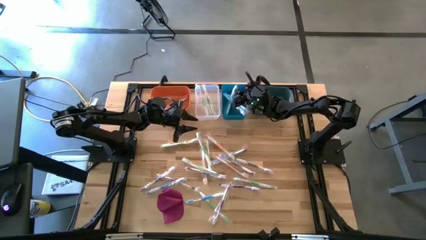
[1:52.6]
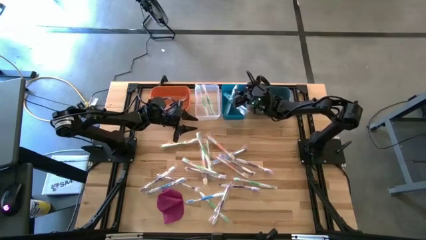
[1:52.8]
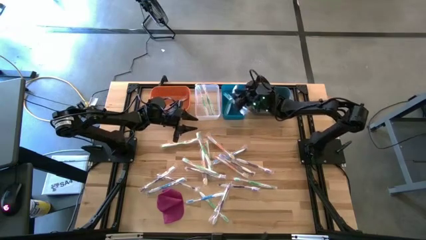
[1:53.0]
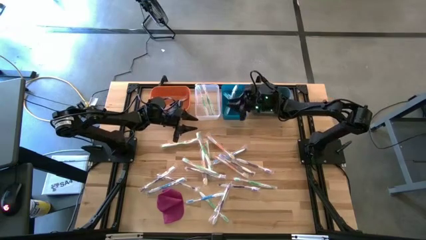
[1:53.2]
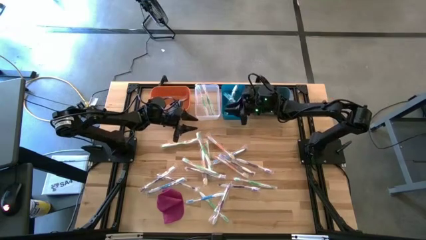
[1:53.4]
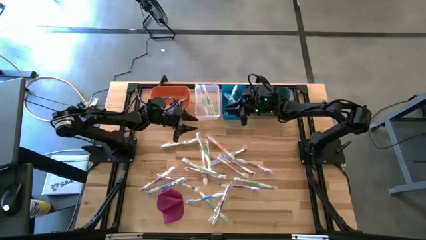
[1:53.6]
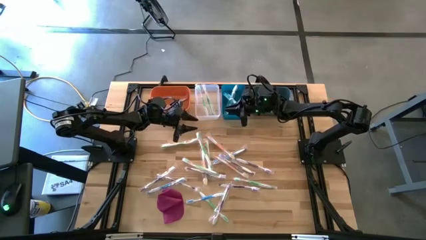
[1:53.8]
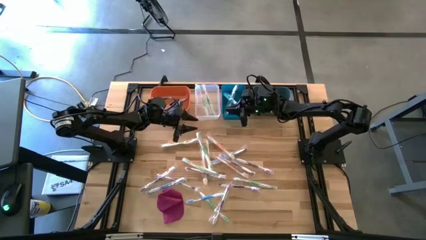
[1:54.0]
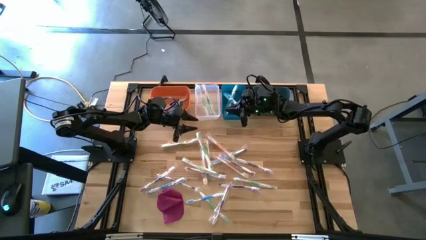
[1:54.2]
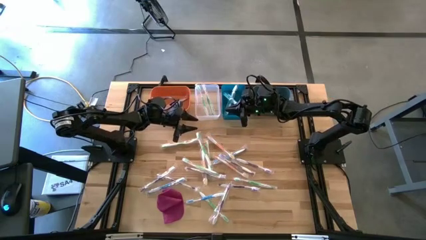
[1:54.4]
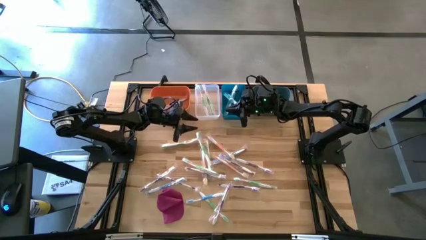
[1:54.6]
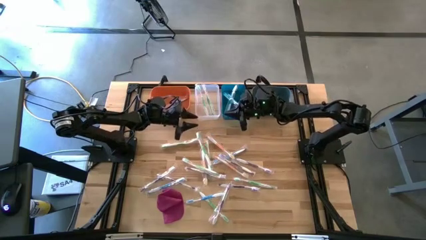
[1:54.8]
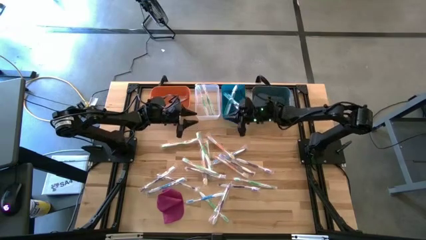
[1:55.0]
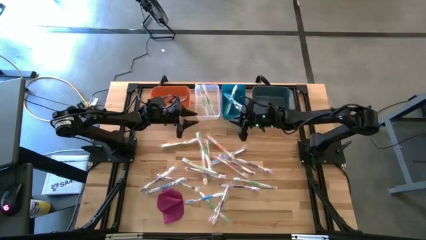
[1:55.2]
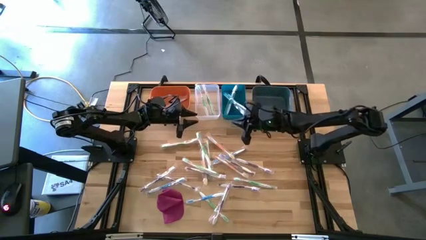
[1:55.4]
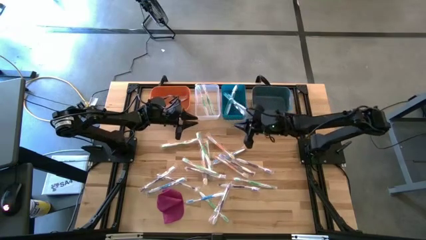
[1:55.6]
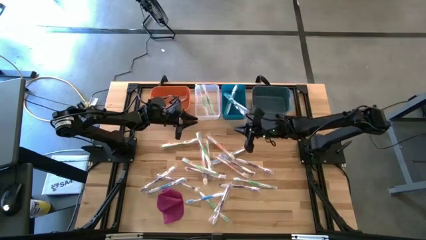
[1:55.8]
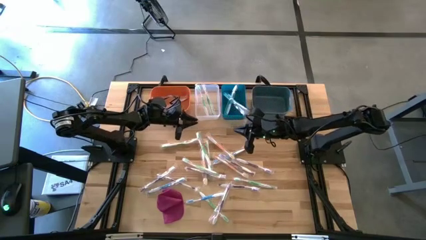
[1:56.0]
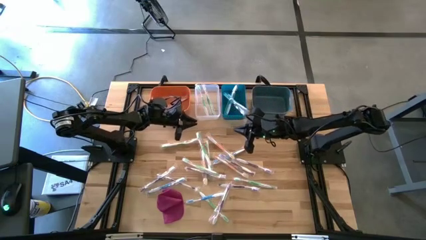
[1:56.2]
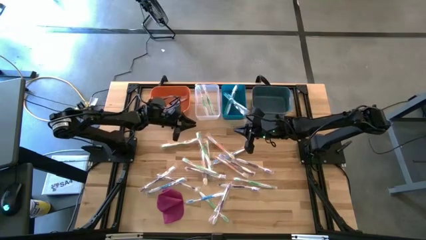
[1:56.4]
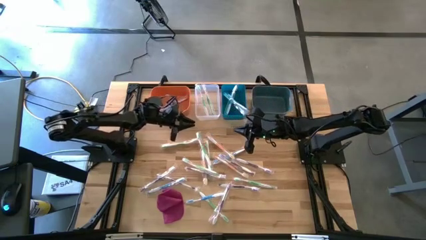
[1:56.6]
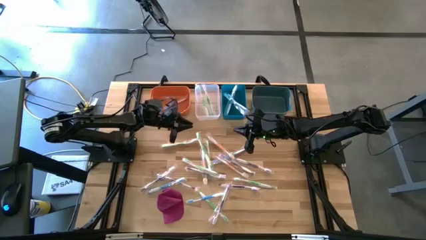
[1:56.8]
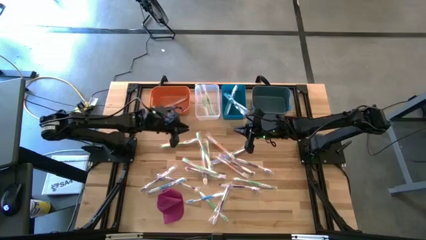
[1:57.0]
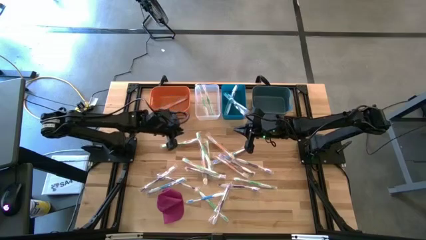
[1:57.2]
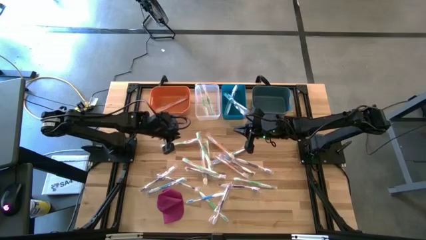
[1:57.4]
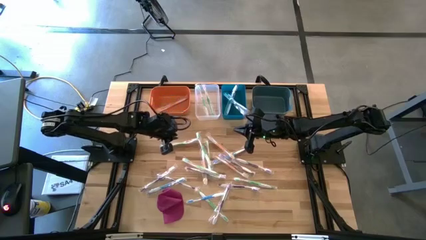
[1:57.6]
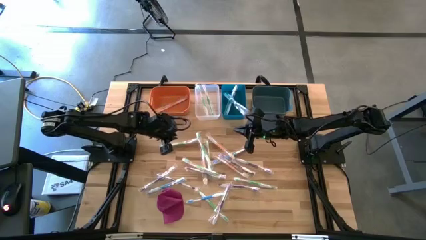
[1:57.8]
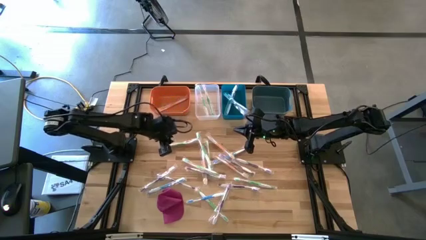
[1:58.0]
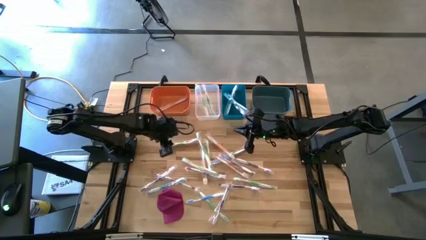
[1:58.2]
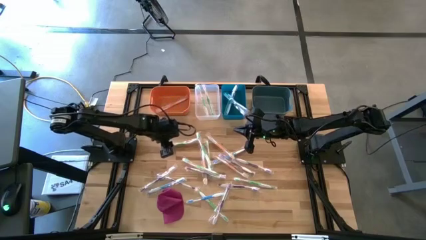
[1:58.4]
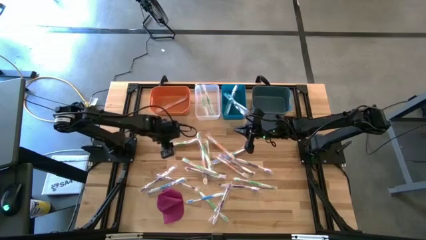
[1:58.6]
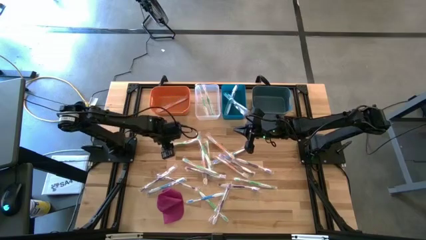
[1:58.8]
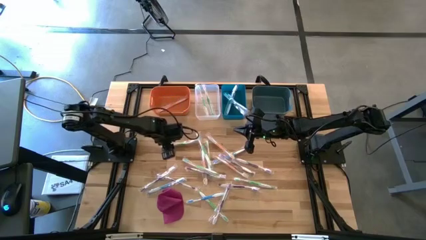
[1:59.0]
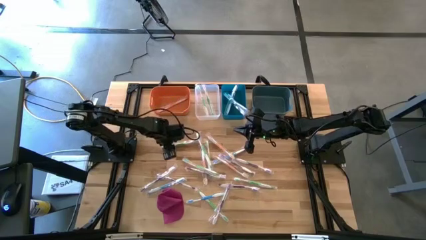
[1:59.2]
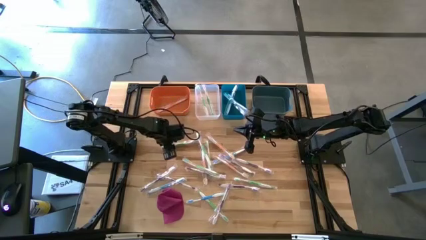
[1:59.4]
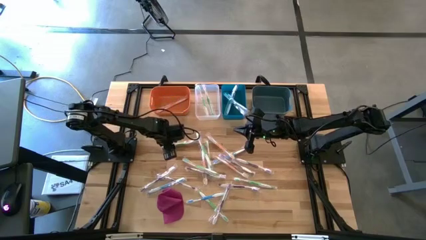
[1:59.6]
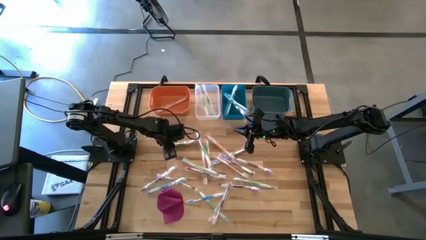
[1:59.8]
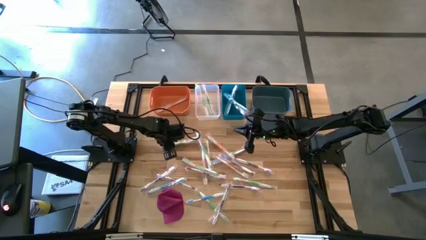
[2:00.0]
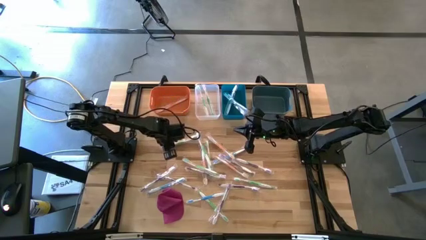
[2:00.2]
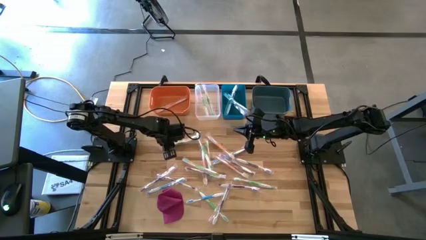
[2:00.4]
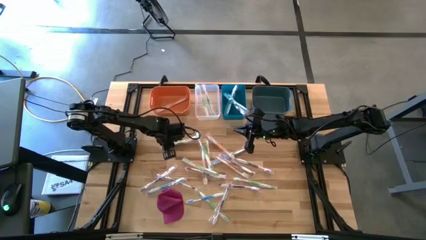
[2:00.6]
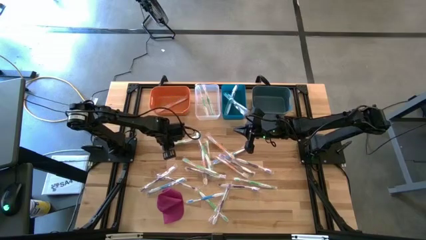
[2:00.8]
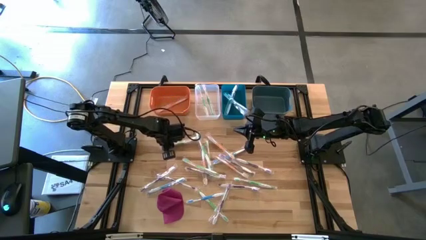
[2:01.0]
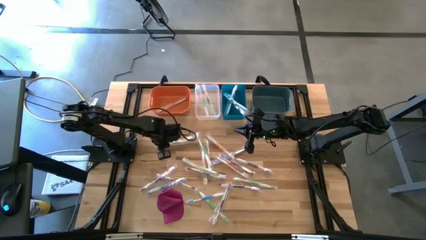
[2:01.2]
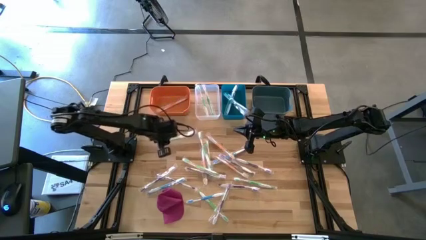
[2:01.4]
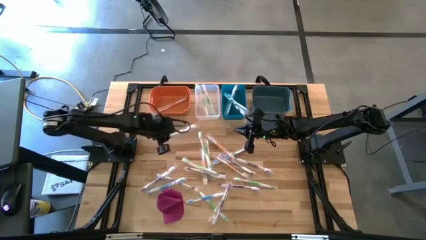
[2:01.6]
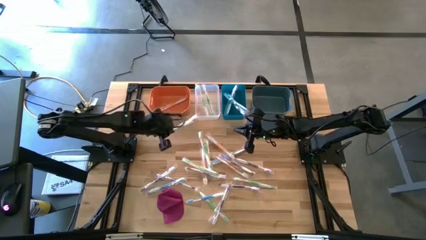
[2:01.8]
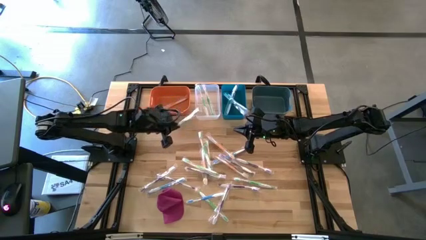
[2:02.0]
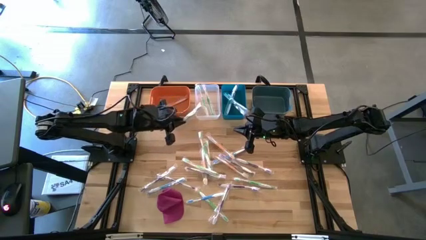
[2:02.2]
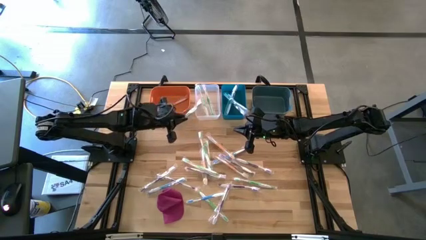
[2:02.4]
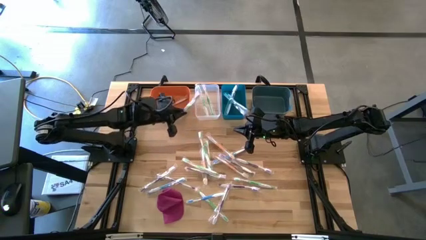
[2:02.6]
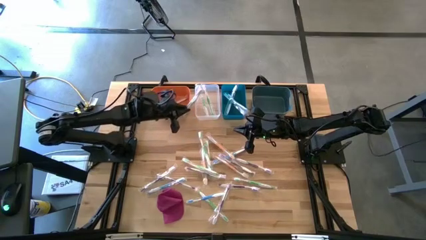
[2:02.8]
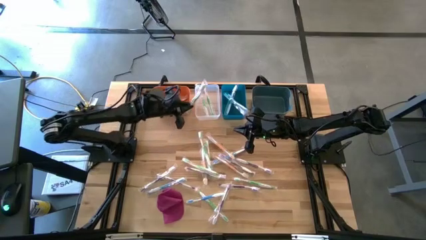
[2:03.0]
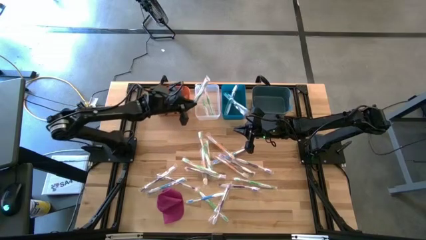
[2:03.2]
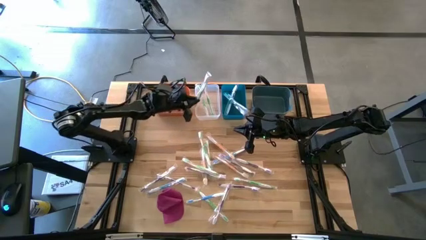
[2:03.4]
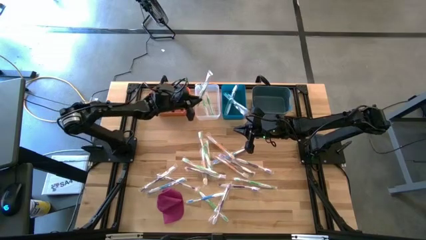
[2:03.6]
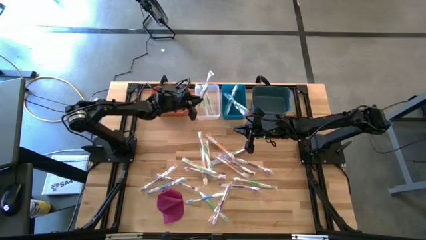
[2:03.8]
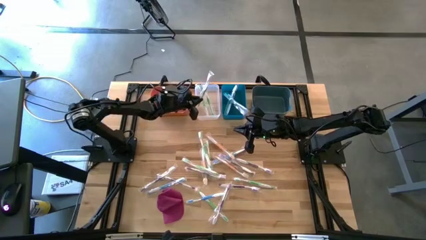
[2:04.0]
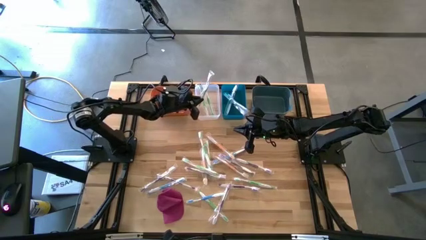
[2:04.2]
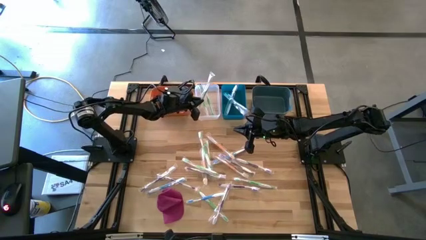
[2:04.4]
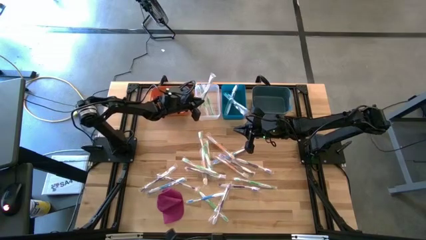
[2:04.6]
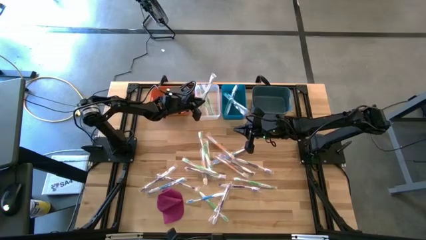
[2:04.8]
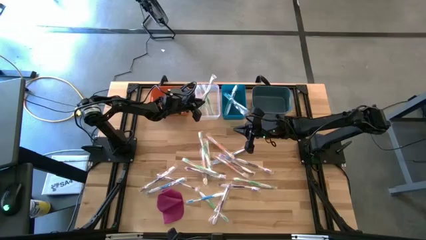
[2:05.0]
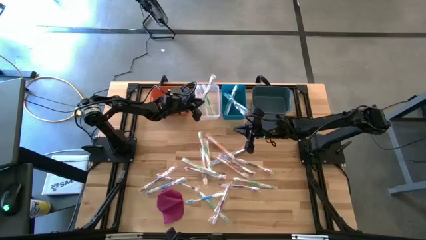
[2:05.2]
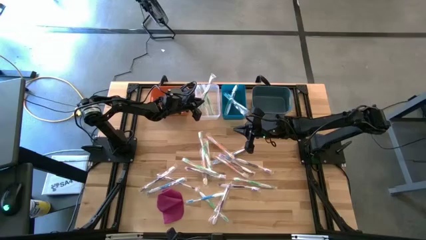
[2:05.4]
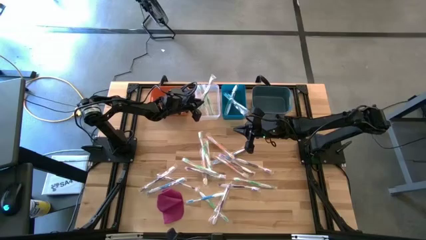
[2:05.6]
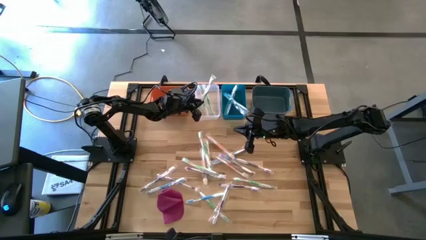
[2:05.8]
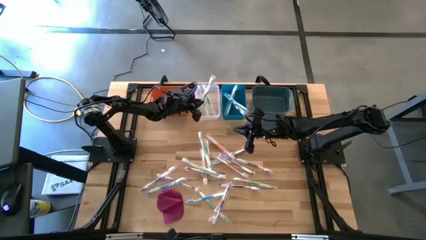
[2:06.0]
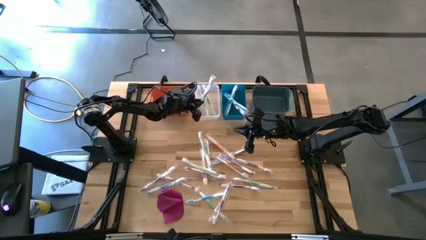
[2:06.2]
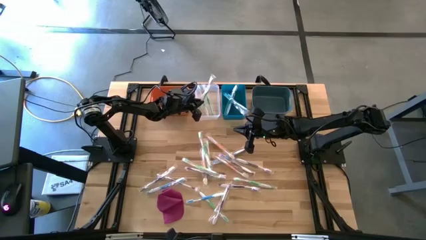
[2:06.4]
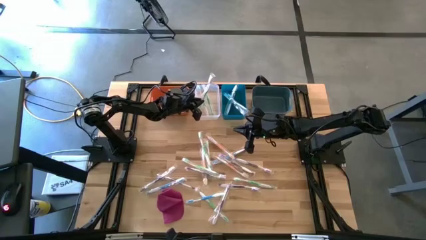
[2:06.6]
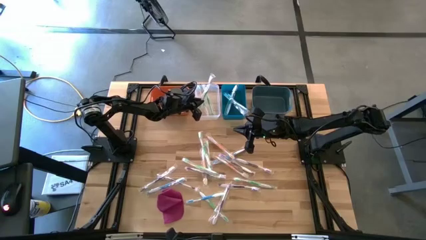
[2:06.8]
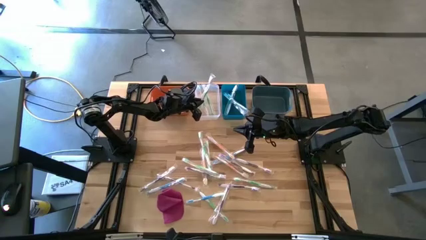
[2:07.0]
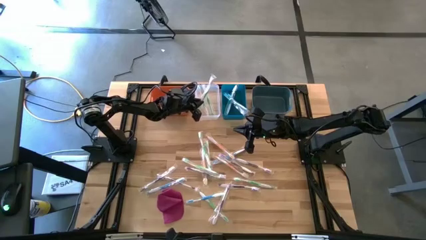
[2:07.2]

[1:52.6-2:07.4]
Task: Pick & Place Toothbrushes
Put the green toothbrush into the transparent bin
